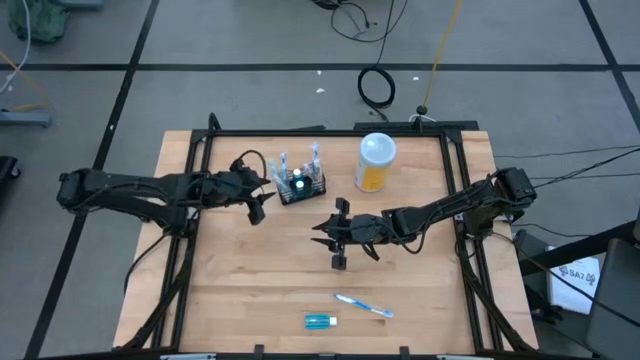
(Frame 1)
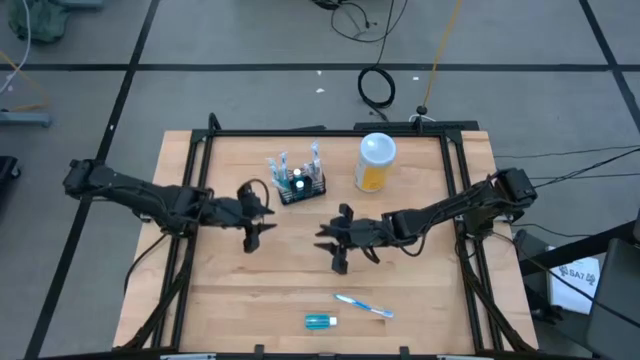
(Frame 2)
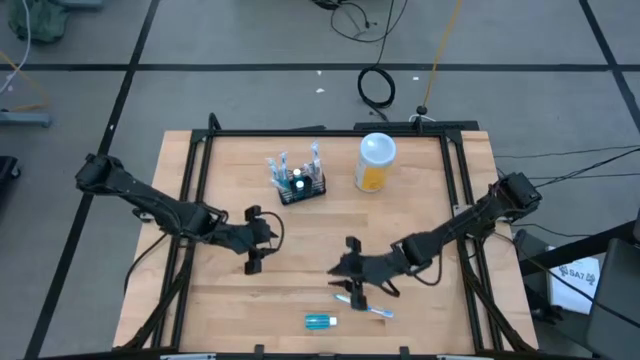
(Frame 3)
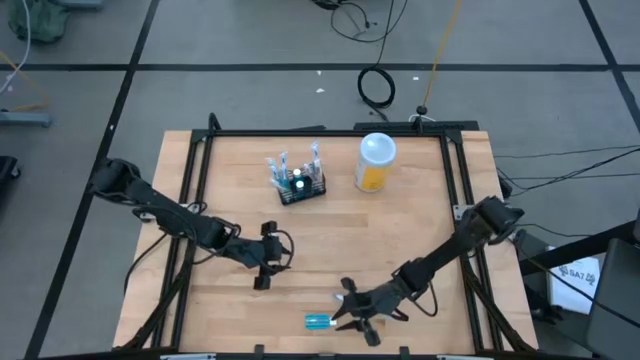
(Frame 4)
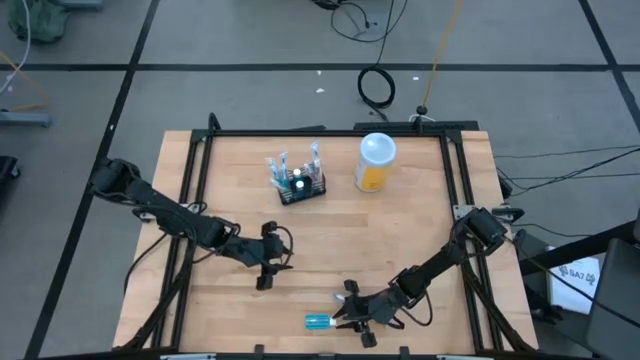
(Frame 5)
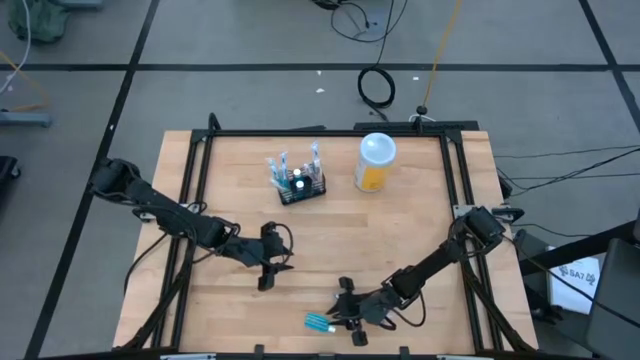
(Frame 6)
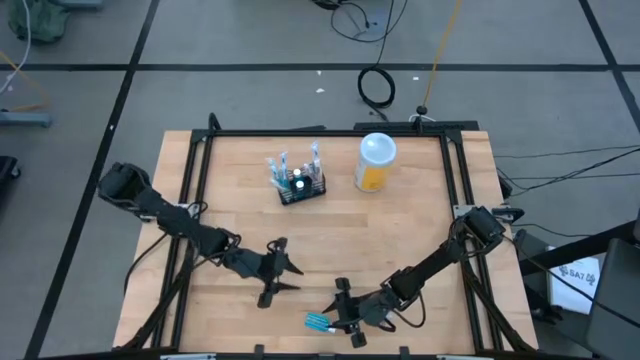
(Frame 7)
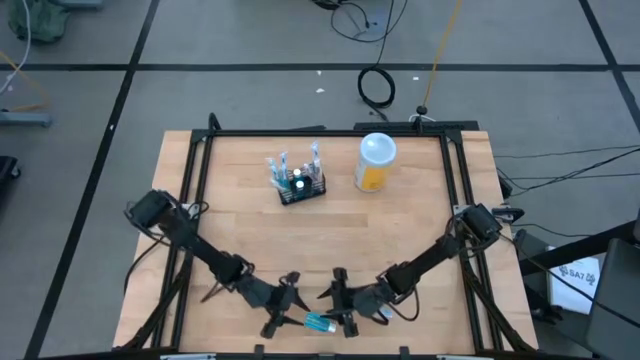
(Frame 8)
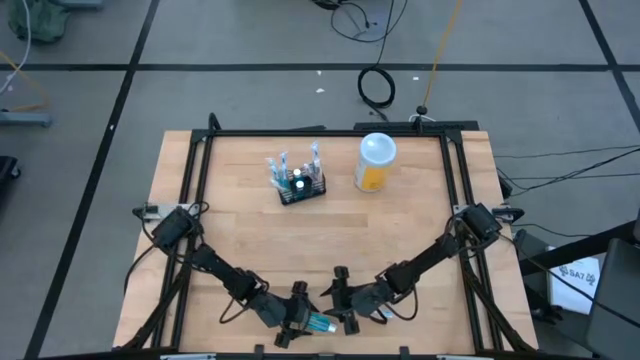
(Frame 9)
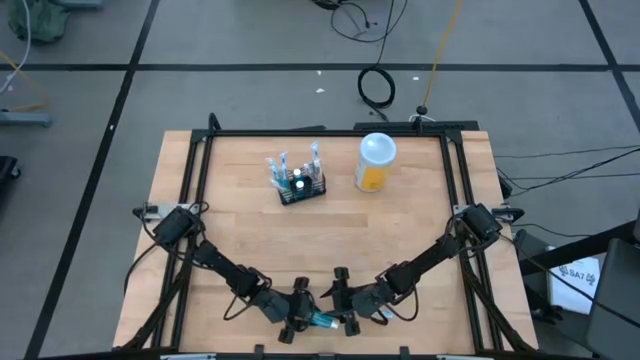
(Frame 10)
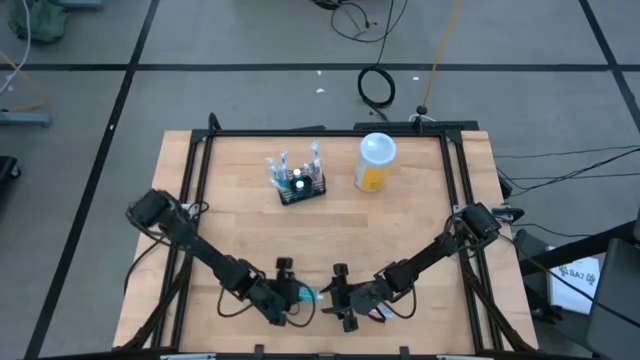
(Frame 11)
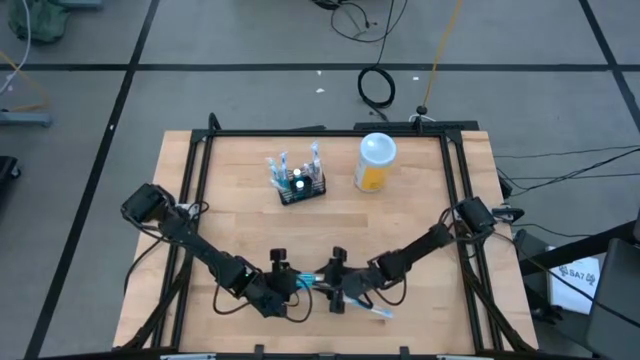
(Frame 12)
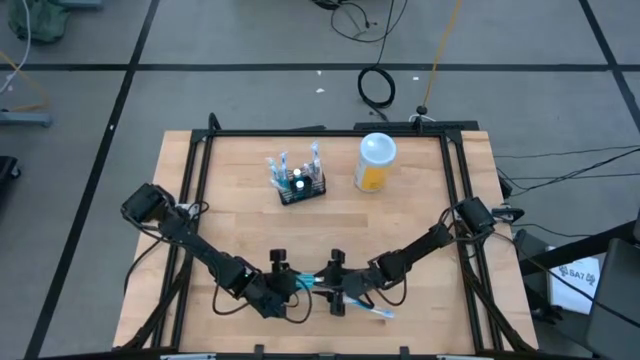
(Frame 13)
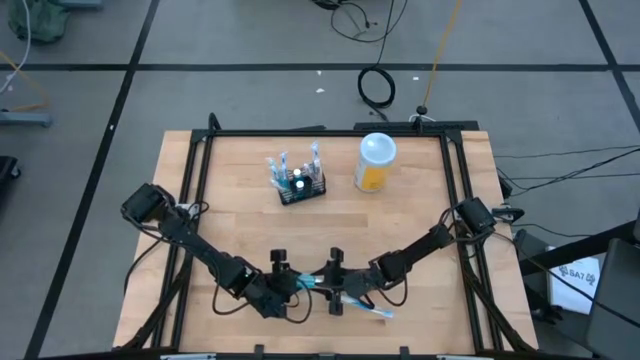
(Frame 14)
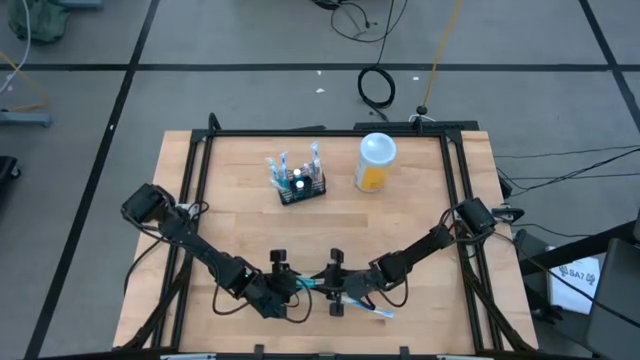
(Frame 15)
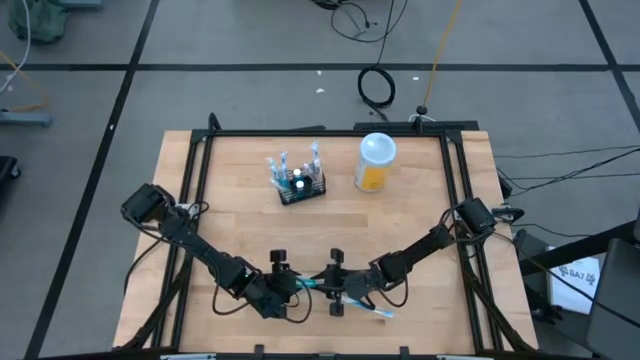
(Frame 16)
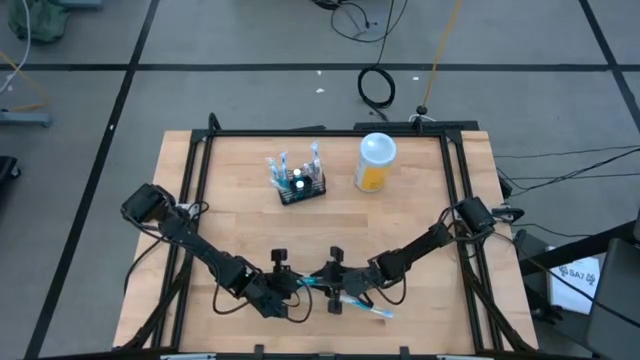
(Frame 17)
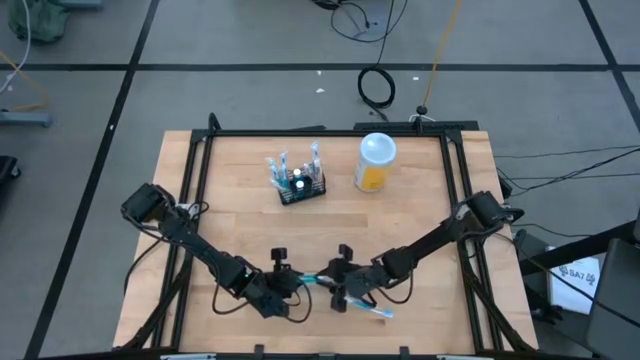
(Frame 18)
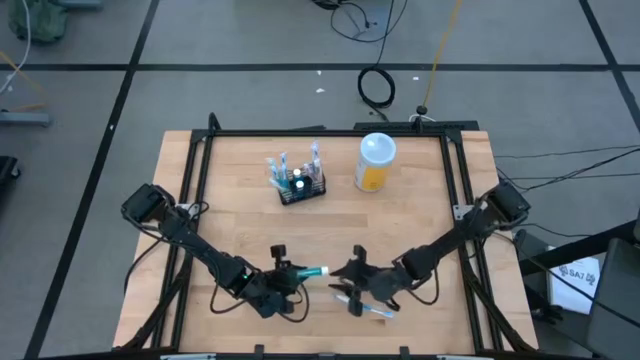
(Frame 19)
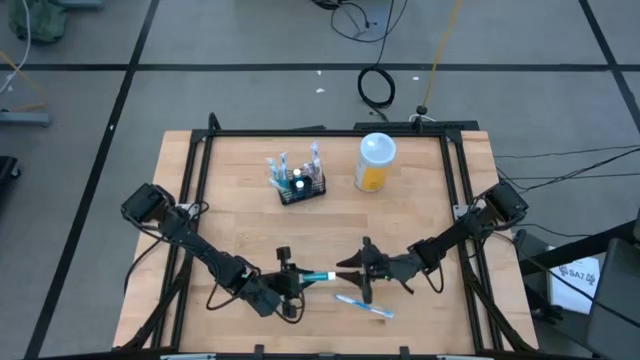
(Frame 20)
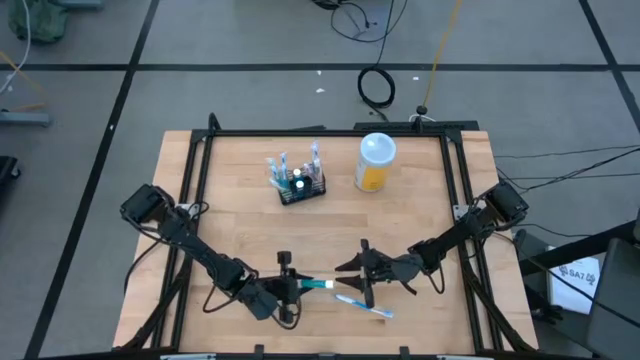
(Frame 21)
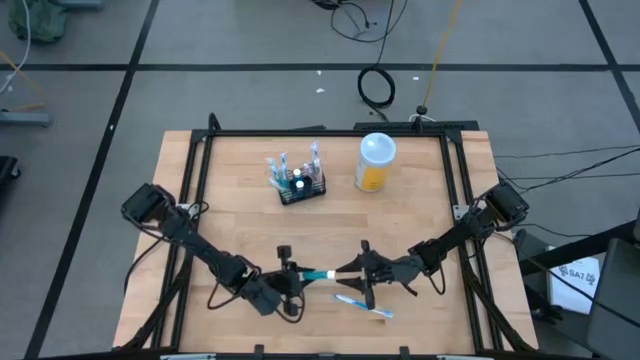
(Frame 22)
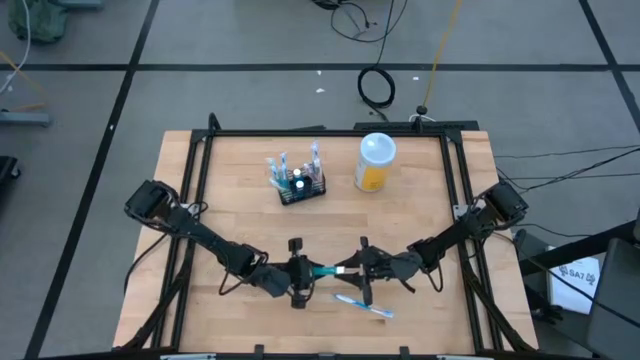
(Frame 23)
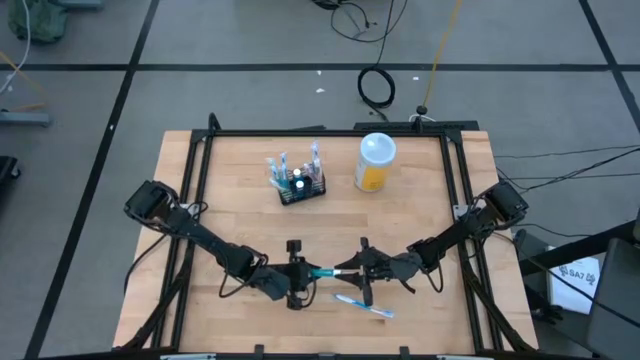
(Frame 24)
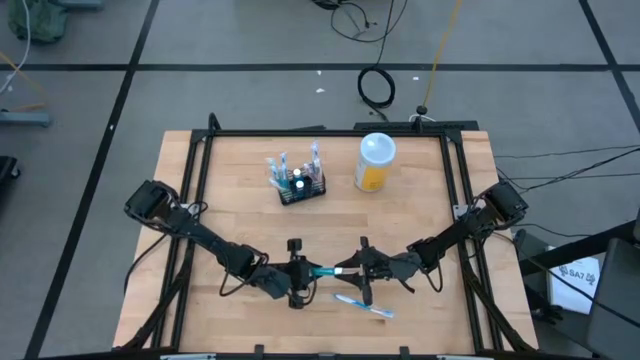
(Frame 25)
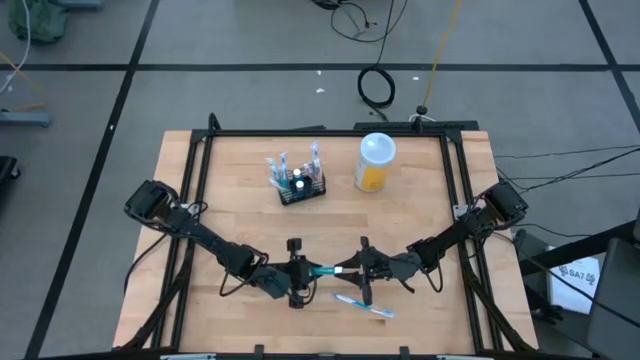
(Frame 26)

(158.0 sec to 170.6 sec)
Task: Pick & Place toothbrushing station
Put the blue mouthwash into the black mesh organizer

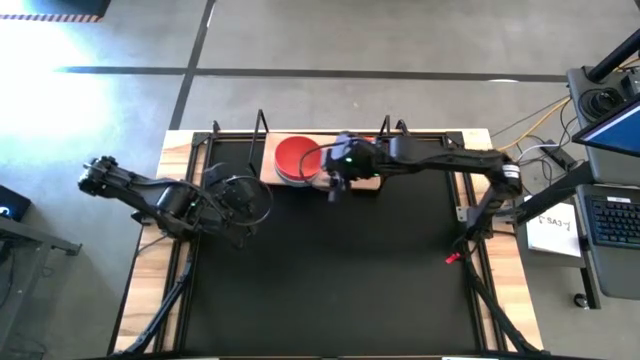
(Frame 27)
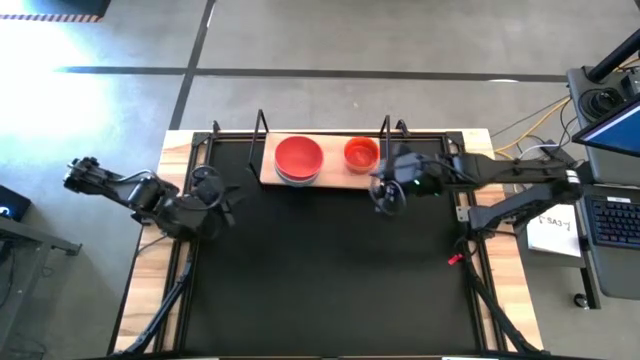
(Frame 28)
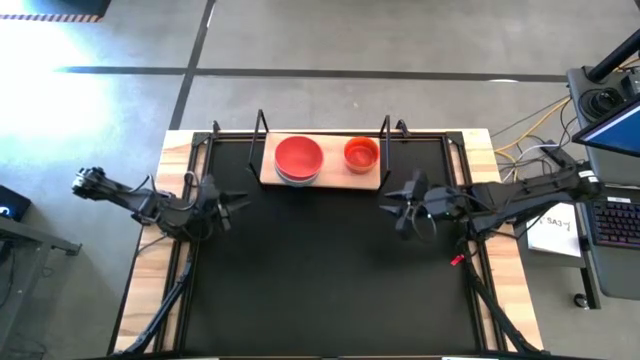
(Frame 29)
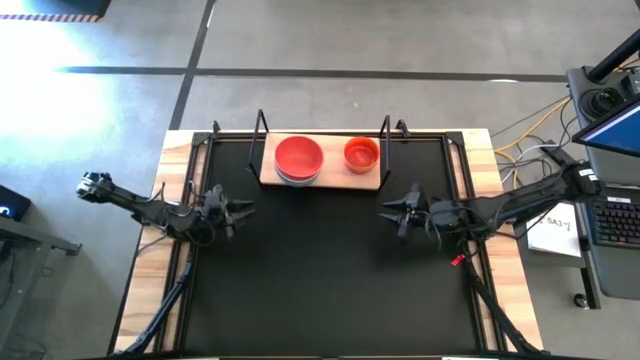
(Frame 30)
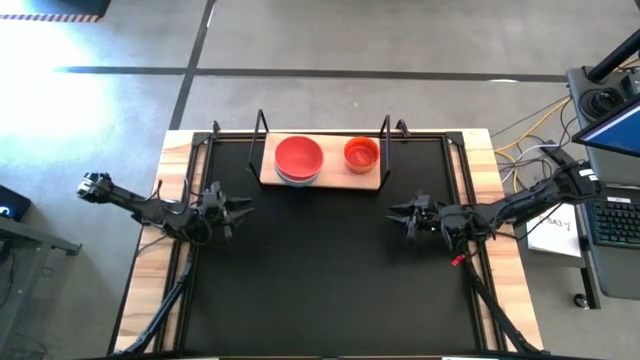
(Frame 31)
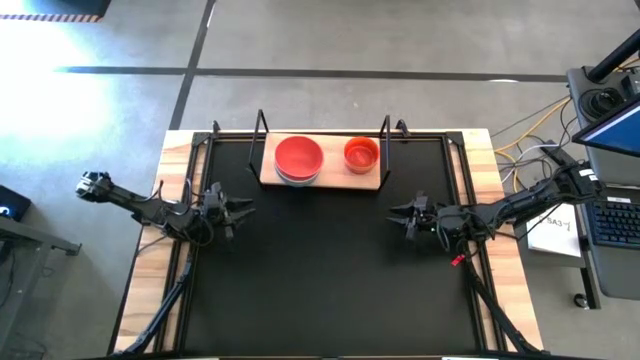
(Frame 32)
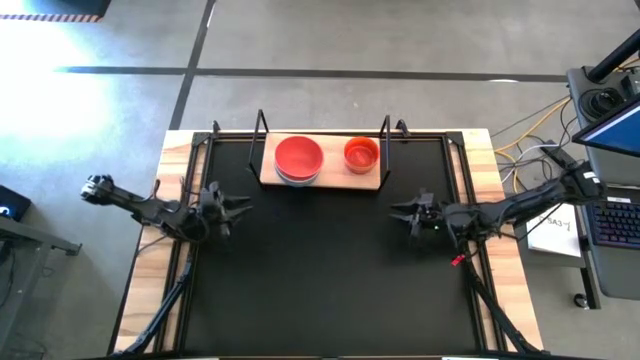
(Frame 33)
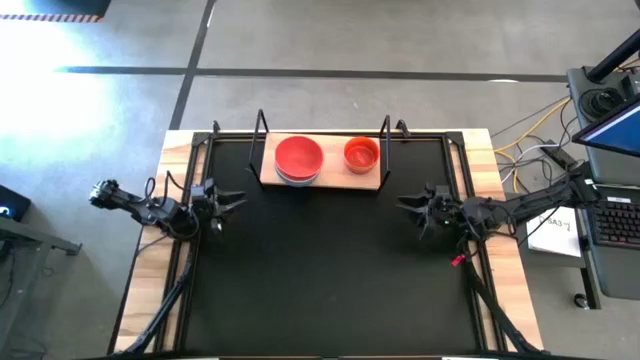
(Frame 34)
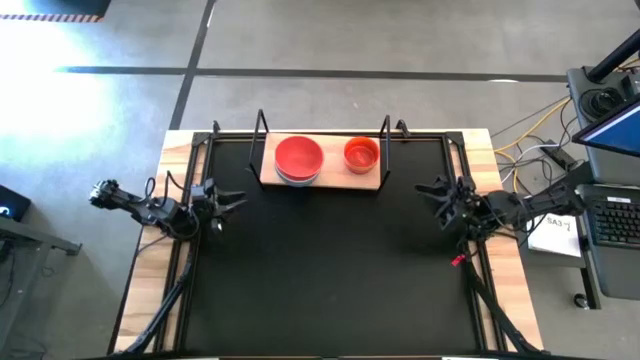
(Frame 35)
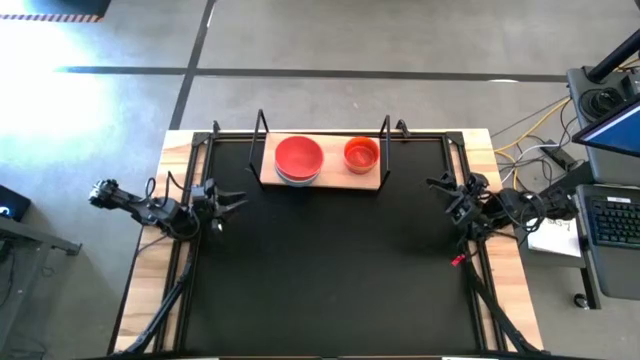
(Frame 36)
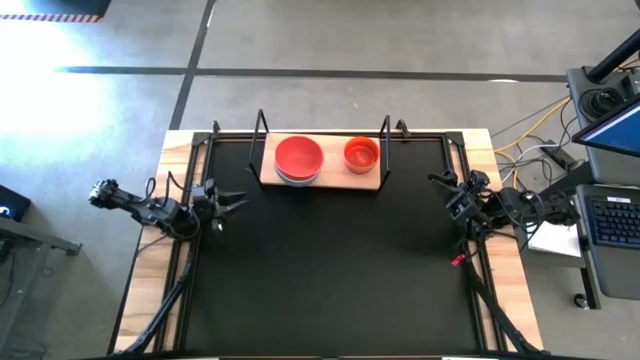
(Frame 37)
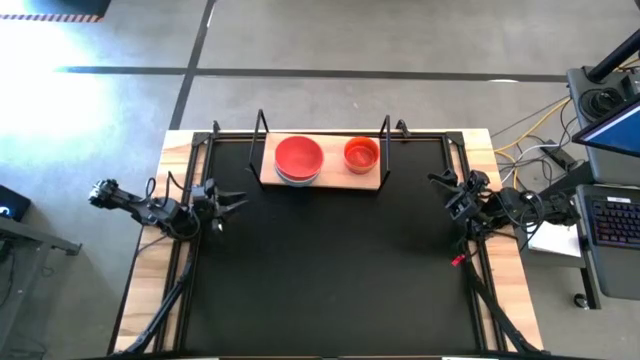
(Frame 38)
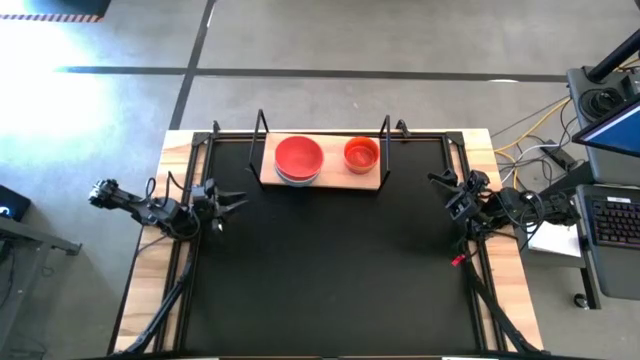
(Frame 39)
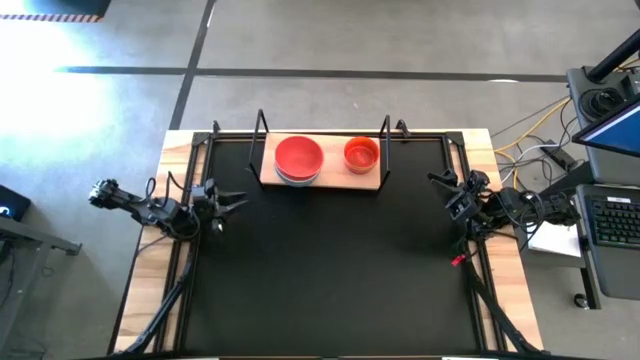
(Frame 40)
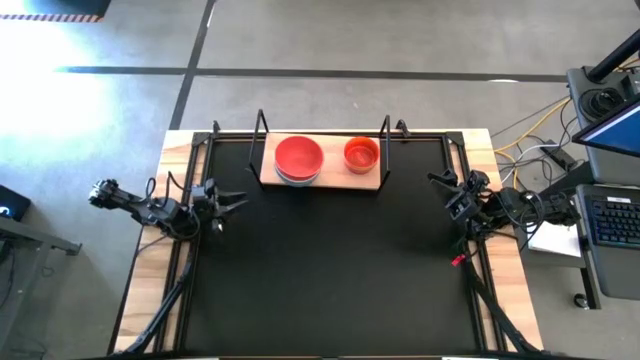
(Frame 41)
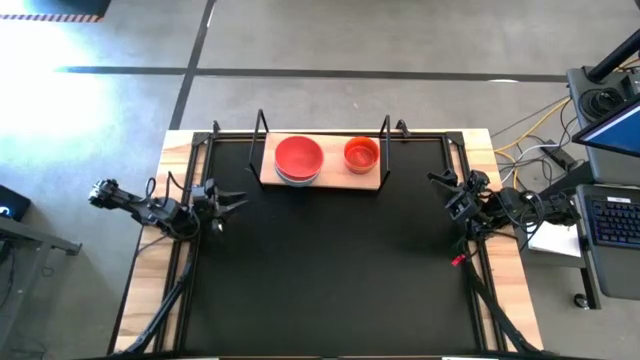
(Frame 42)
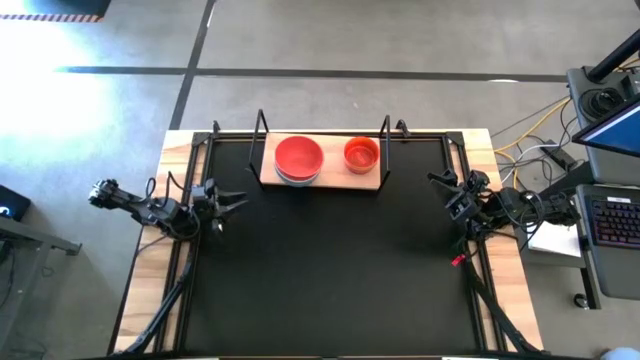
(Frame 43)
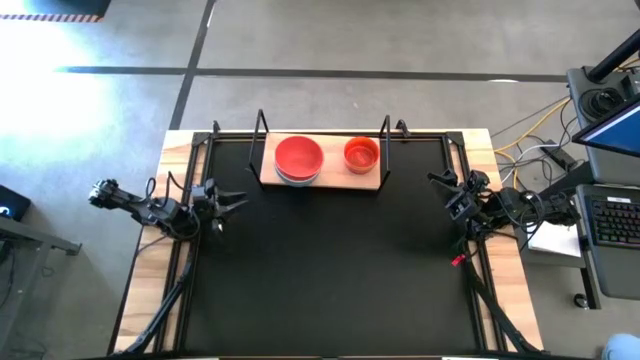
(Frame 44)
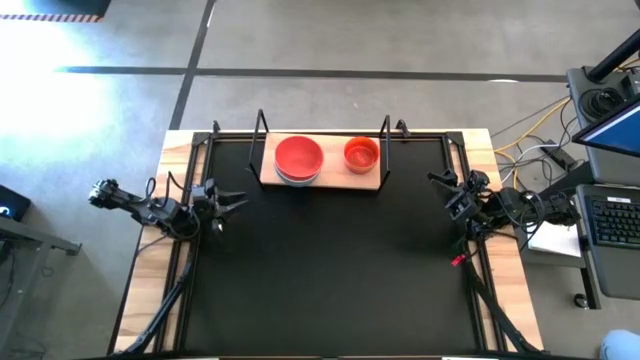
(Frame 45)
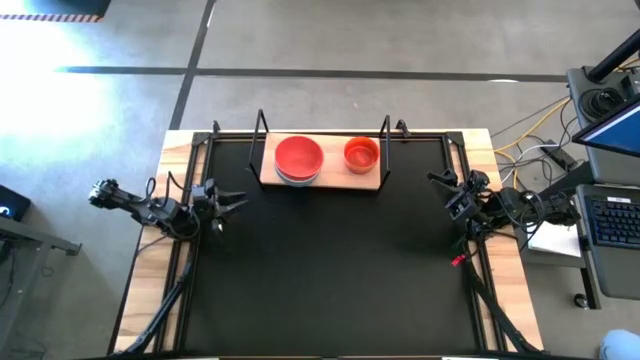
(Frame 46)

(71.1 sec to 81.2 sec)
Task: Place and stack bowls onto a shelf
Return to Home Position
